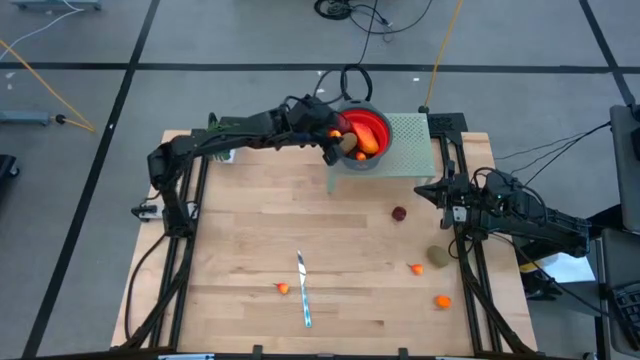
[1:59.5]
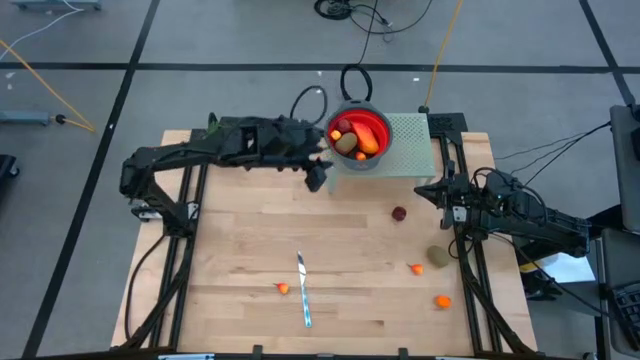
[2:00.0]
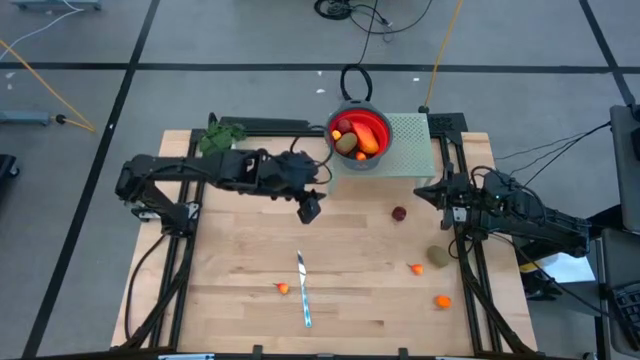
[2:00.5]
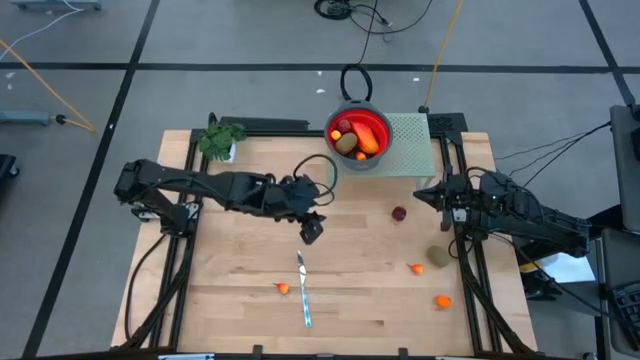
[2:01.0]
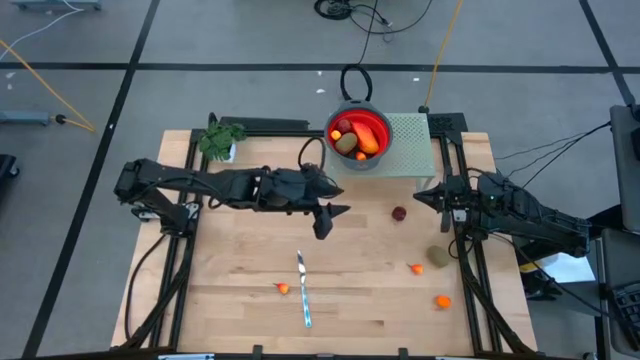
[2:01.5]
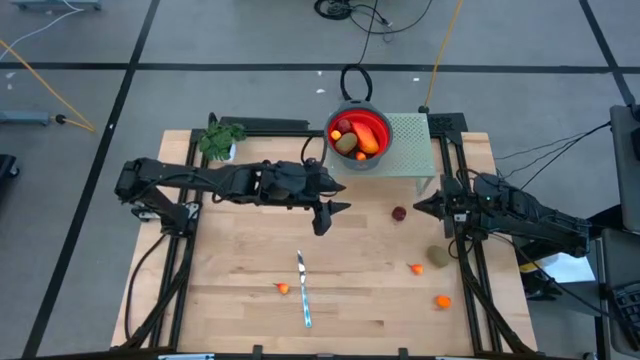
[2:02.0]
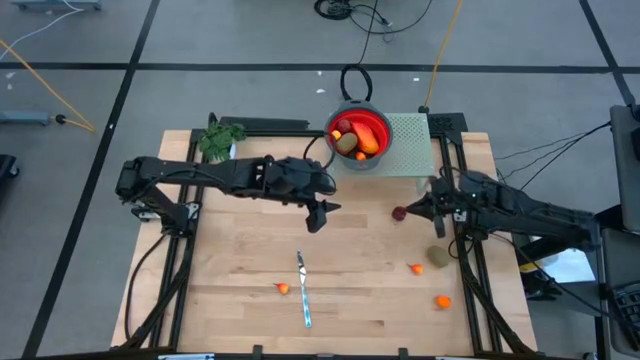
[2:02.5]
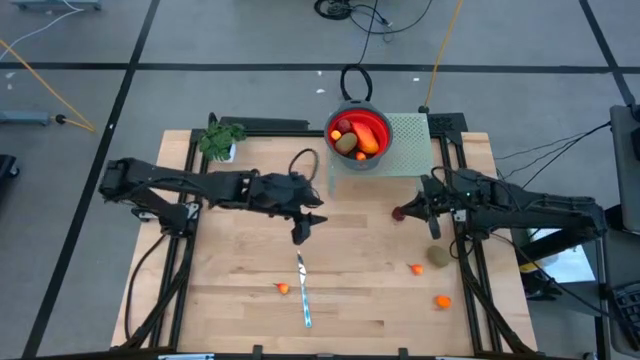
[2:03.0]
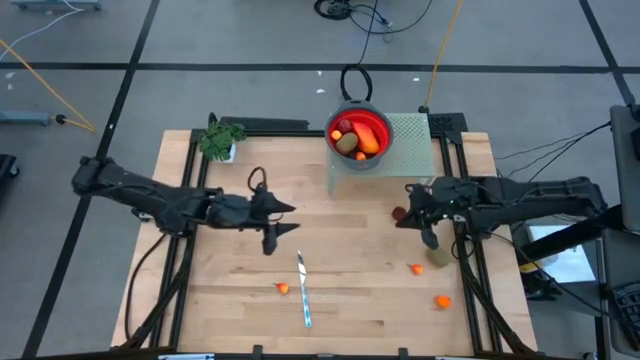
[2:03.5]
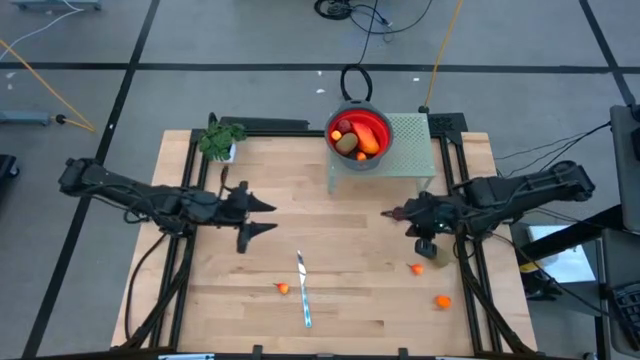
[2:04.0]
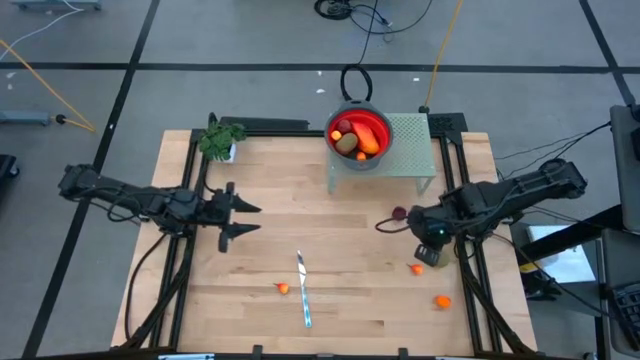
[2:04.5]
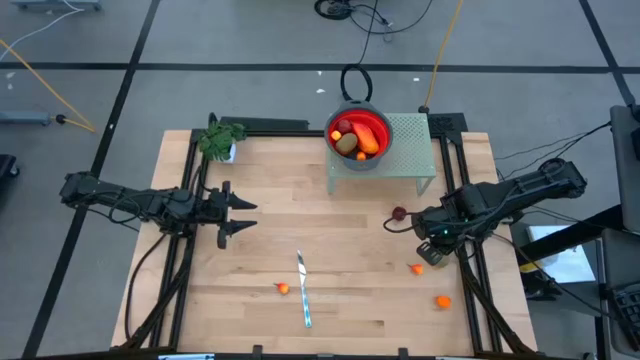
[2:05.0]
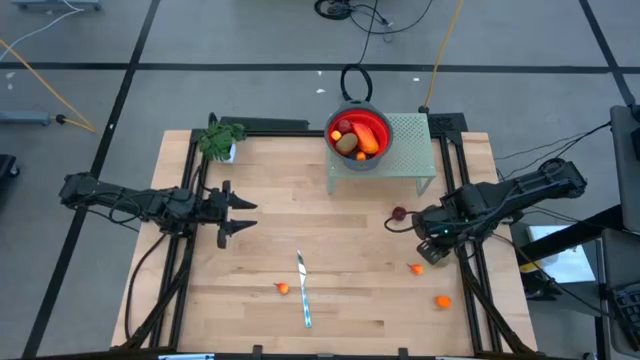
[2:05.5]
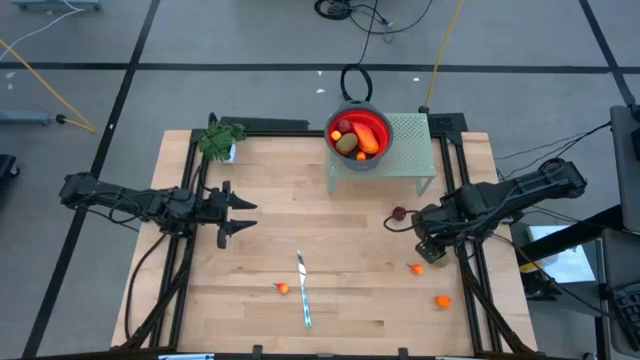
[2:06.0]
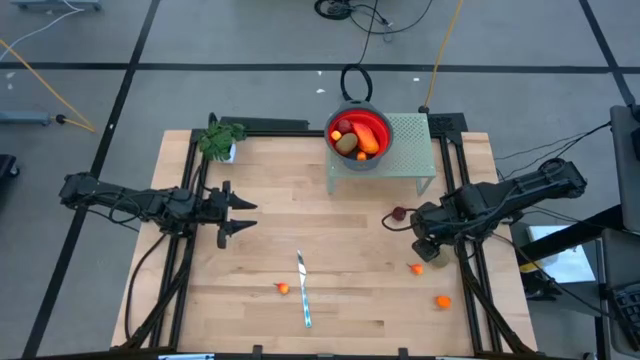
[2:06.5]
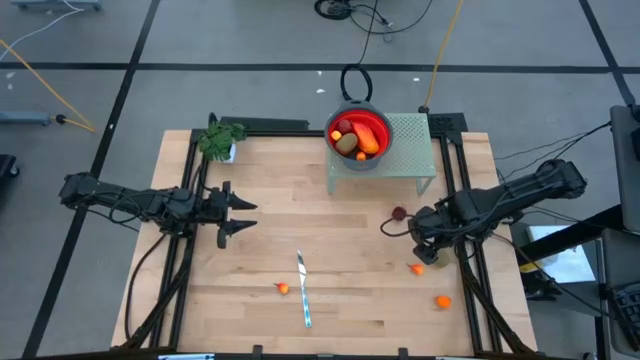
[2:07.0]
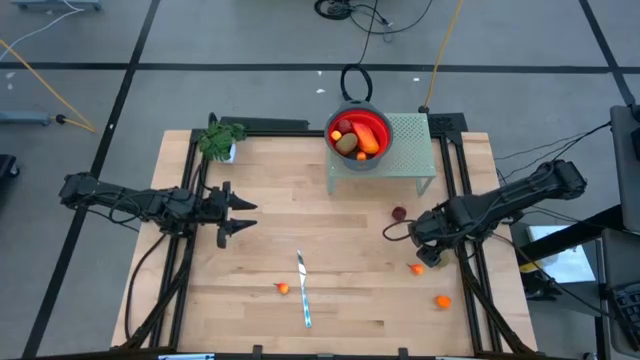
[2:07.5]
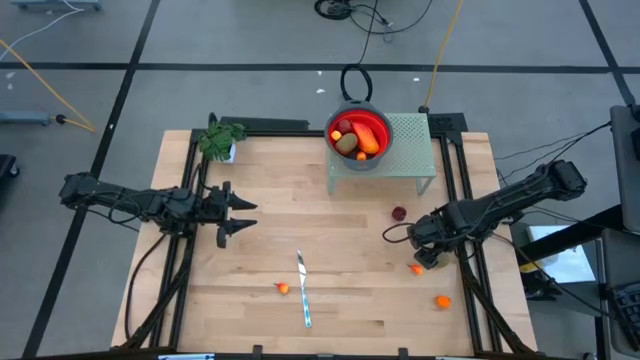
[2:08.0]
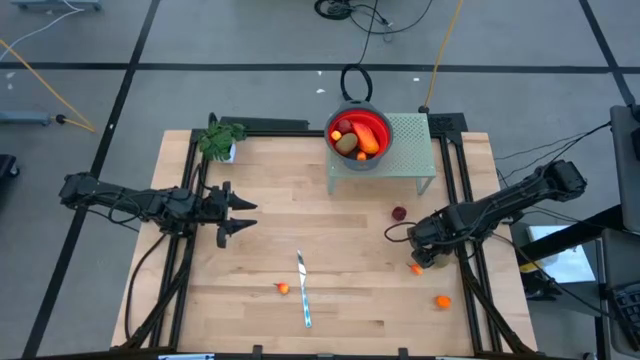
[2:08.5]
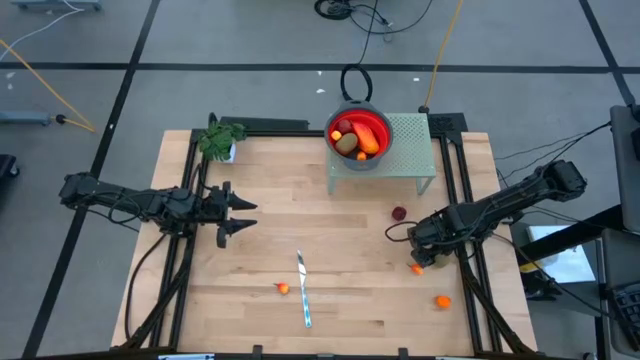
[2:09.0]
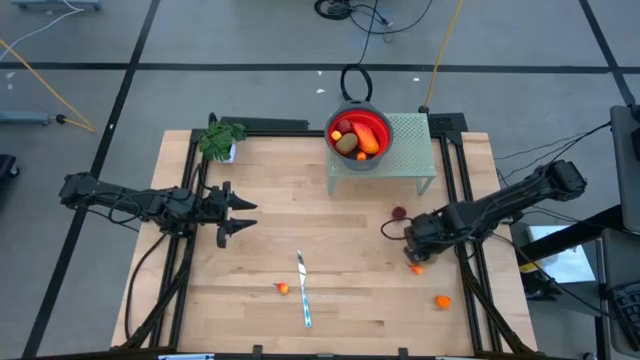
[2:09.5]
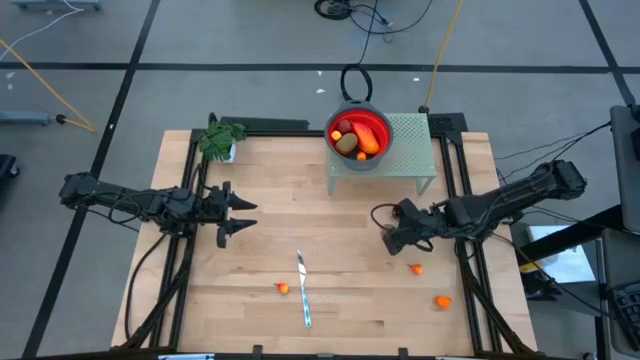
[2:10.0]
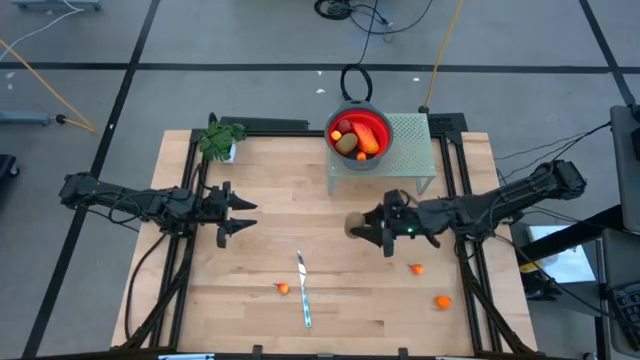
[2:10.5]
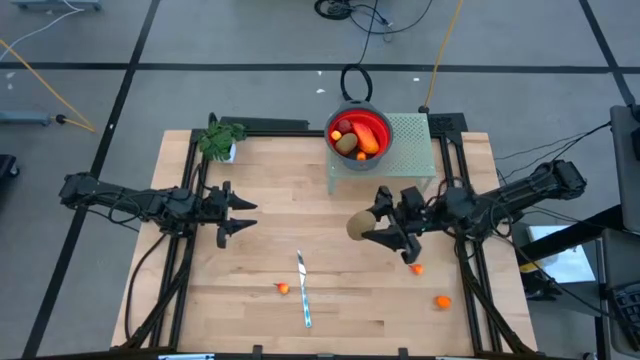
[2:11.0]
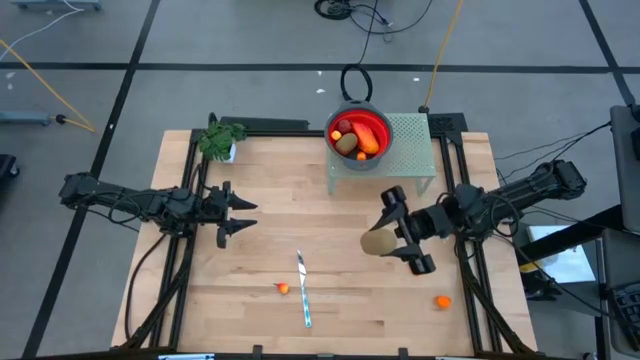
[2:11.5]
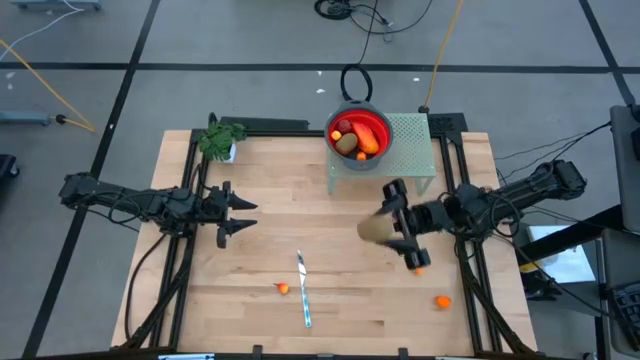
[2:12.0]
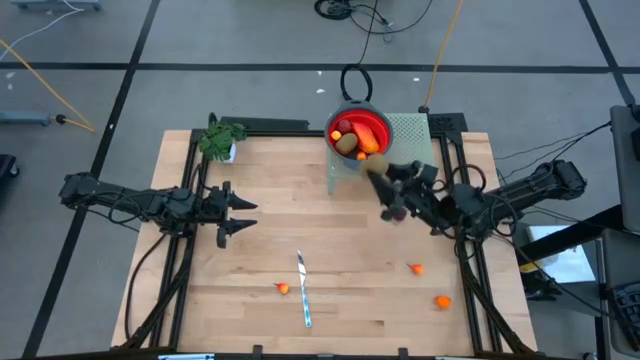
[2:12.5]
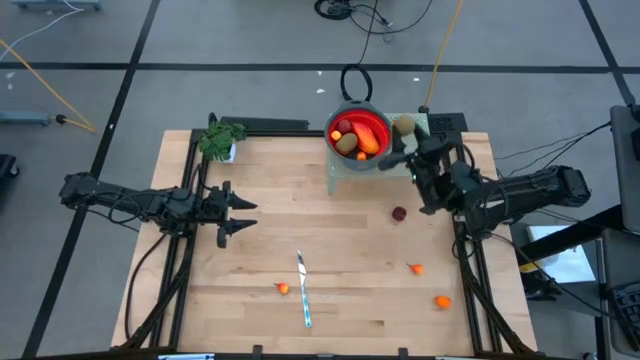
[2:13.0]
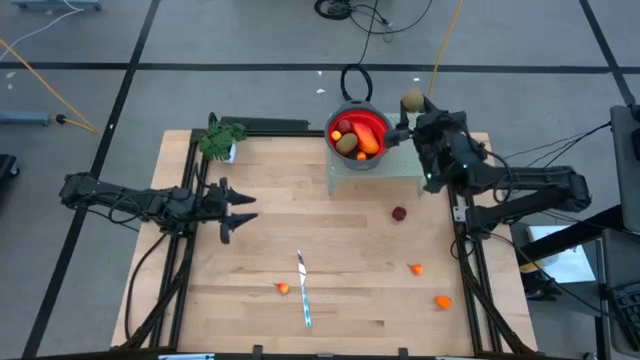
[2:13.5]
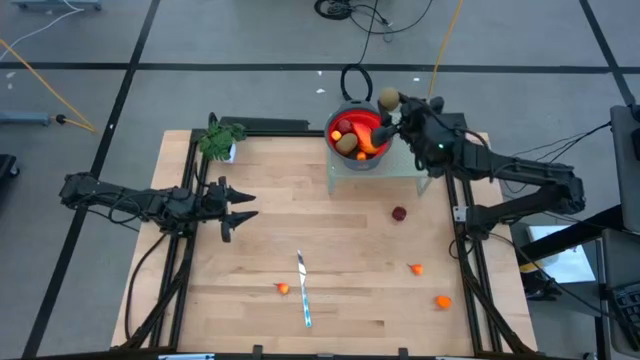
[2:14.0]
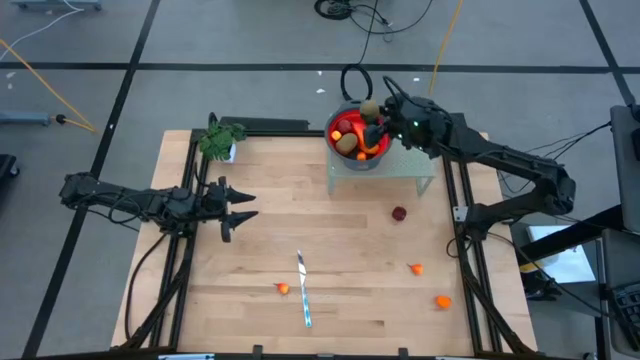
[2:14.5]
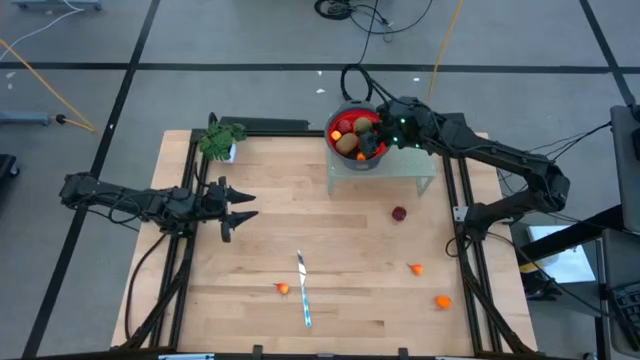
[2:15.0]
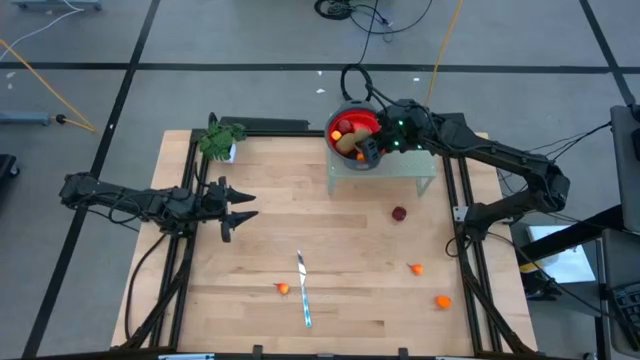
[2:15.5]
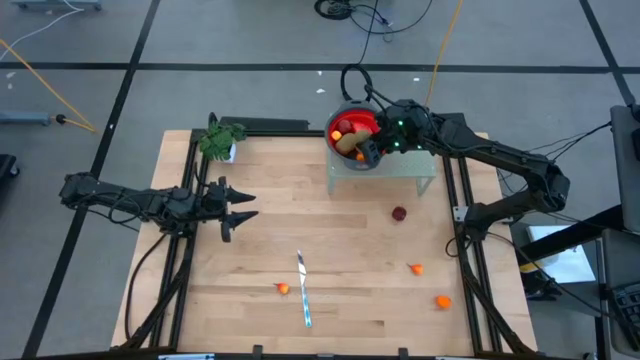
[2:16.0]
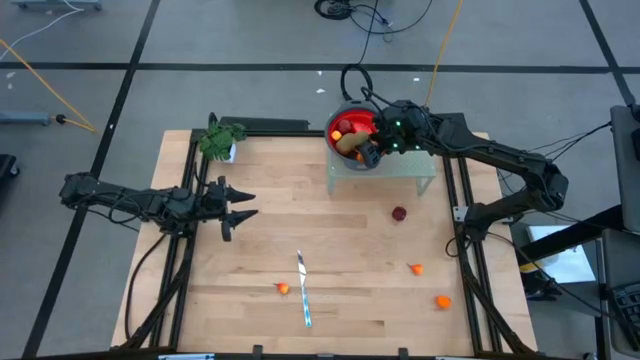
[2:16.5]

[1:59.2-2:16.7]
Task: Pick & Place Fruit
Put the kiwi into the red strainer bowl on the shelf

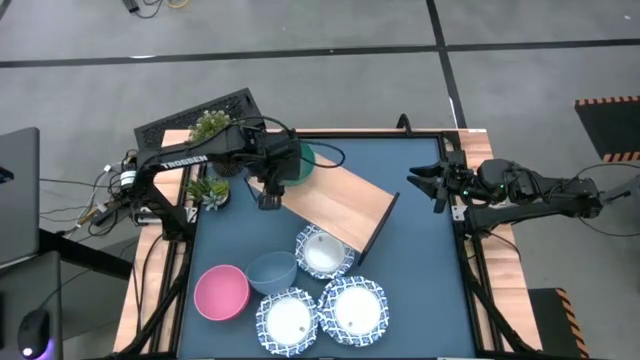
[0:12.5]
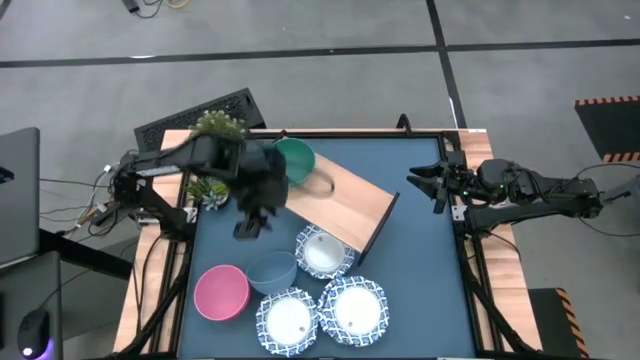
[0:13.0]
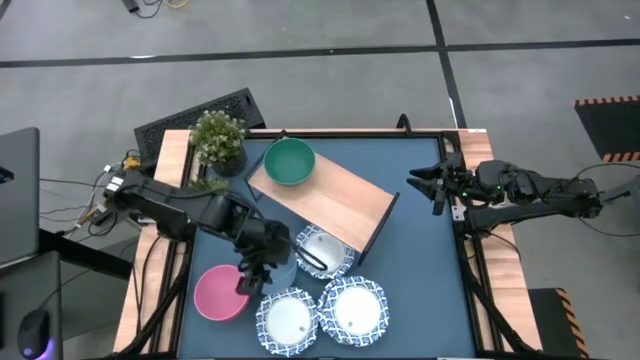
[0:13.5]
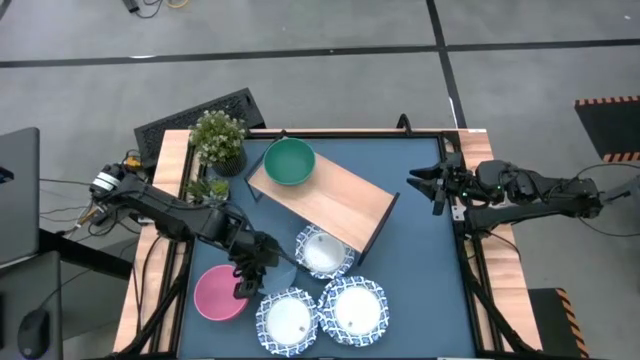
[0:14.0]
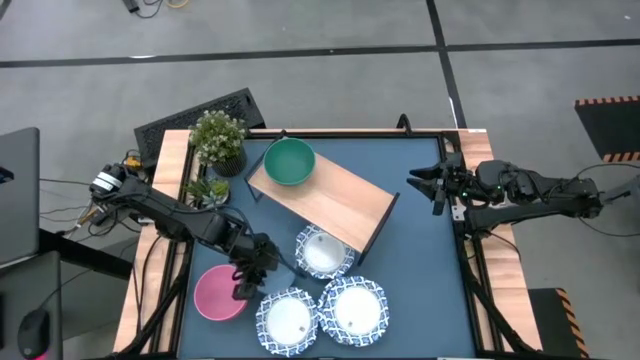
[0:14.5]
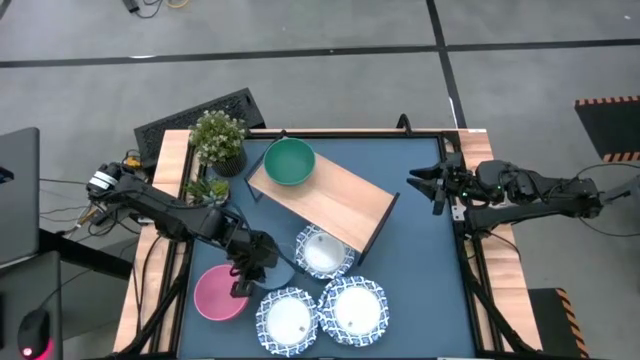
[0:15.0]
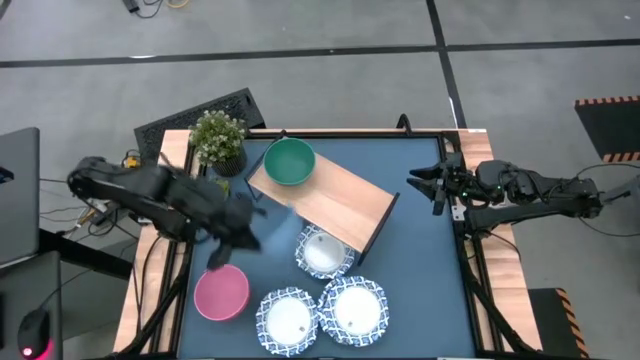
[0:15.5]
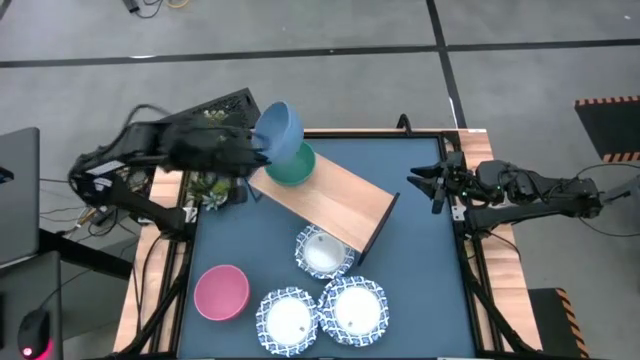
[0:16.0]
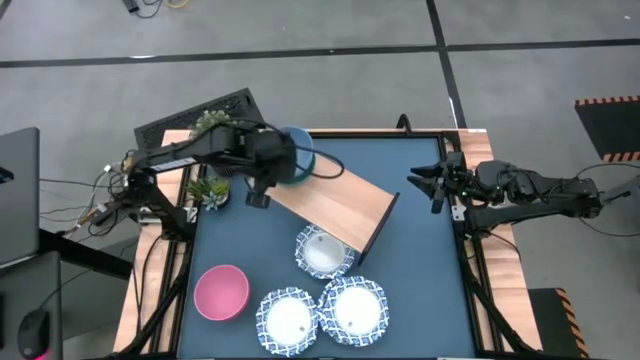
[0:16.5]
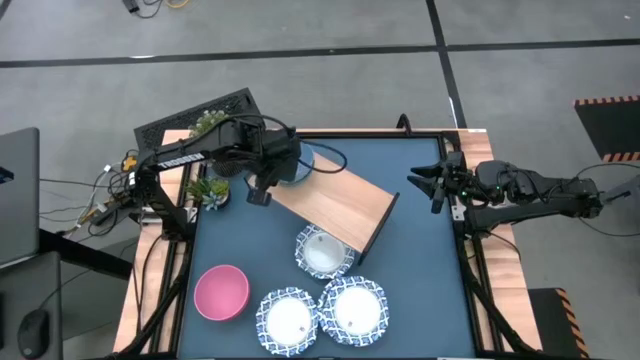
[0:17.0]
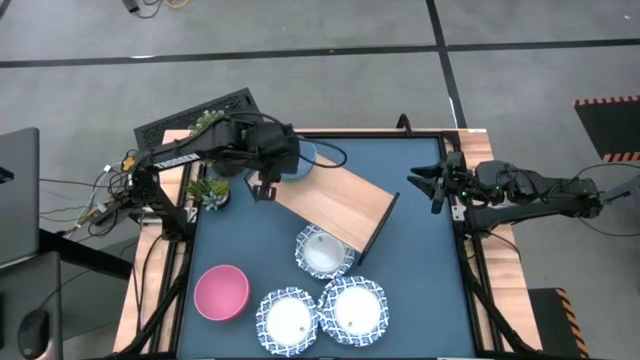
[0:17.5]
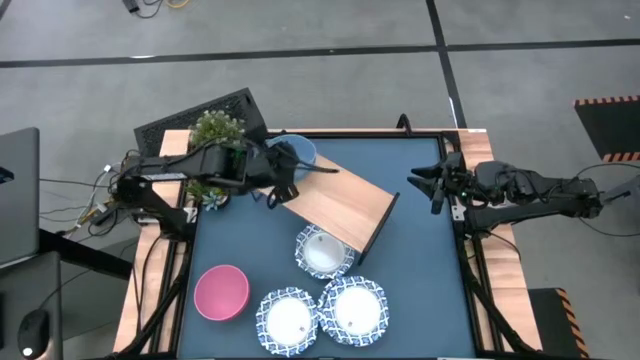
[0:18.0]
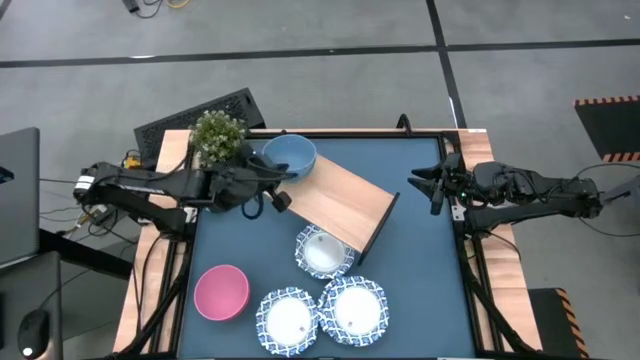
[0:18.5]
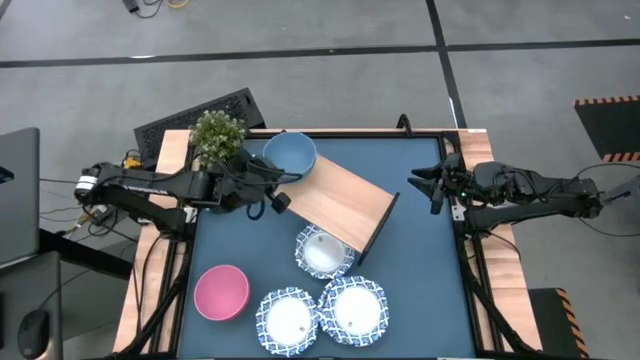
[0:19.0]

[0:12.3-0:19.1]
Task: Place and stack bowls onto a shelf
Stack the blue bowl on top of the green bowl on the shelf
